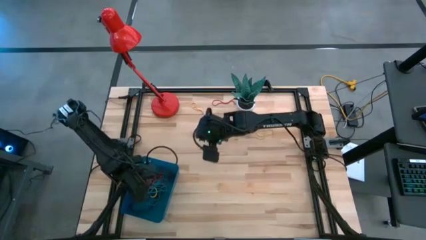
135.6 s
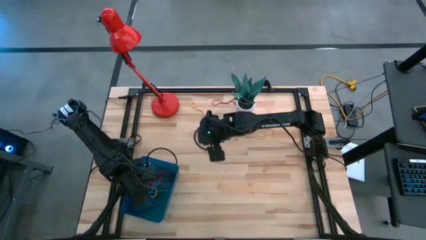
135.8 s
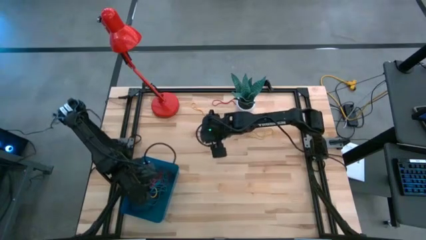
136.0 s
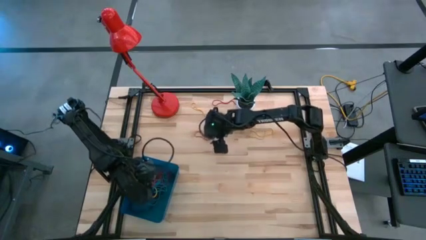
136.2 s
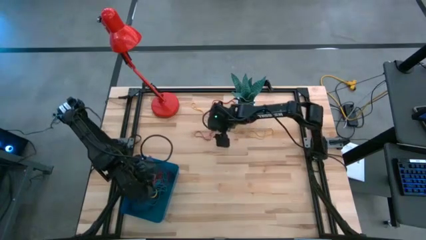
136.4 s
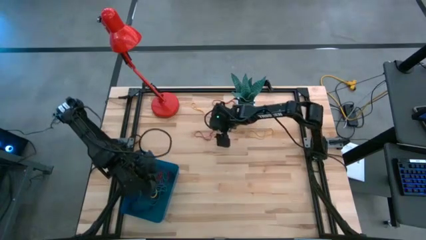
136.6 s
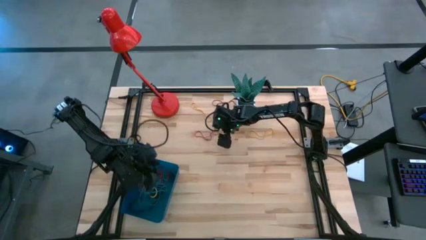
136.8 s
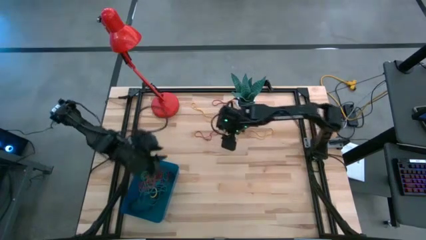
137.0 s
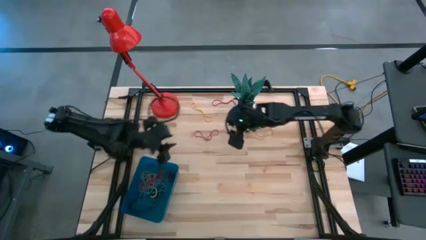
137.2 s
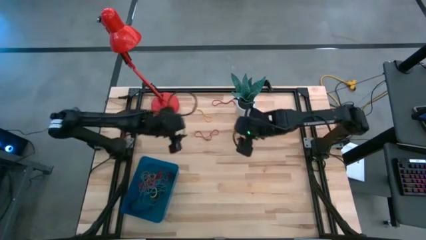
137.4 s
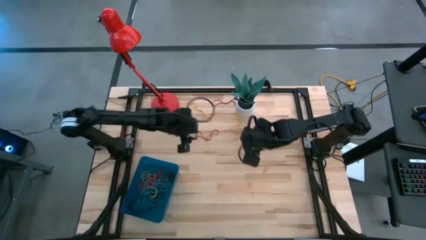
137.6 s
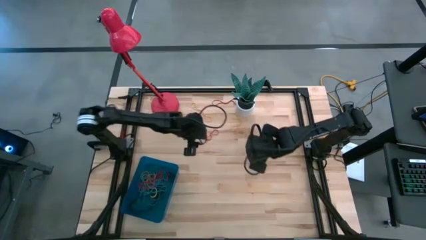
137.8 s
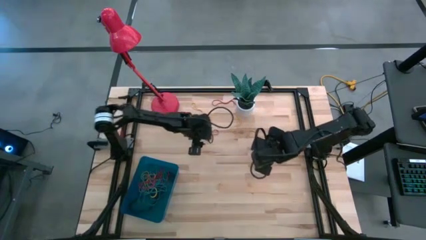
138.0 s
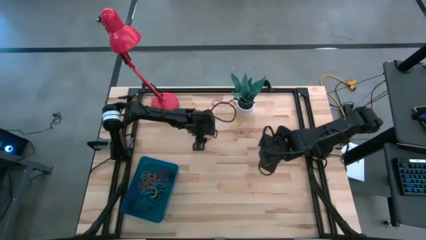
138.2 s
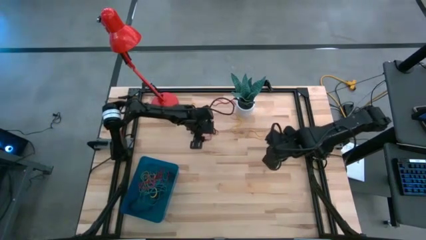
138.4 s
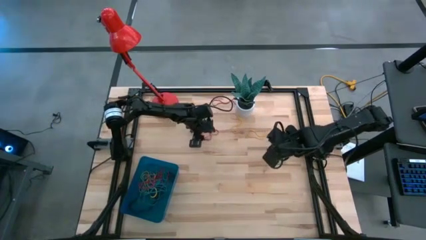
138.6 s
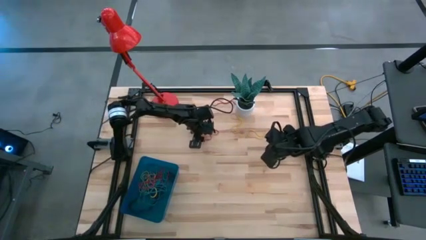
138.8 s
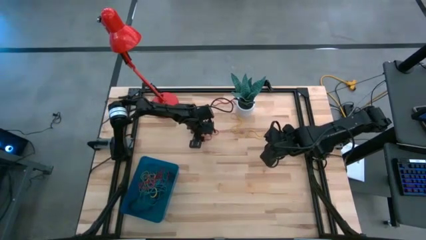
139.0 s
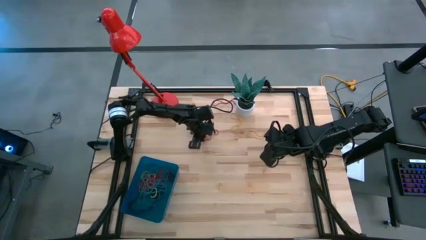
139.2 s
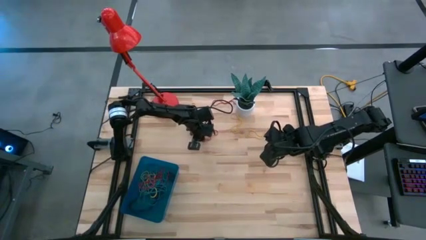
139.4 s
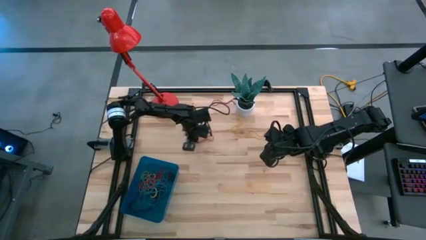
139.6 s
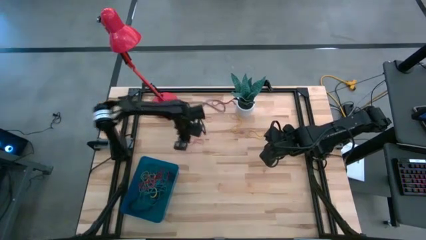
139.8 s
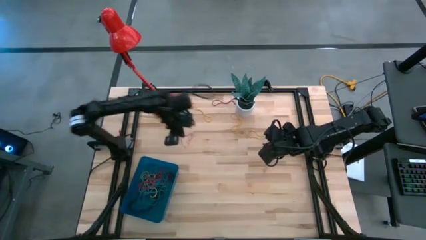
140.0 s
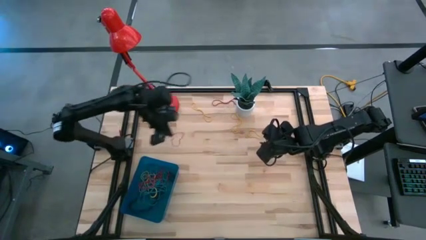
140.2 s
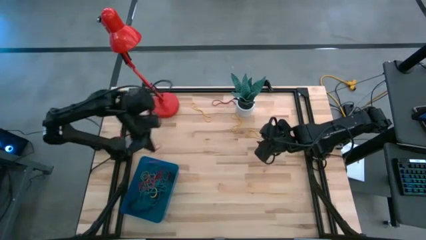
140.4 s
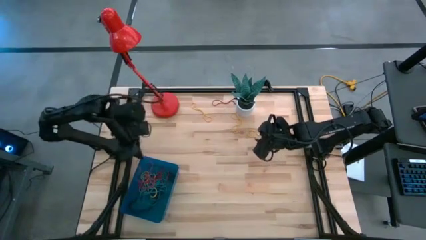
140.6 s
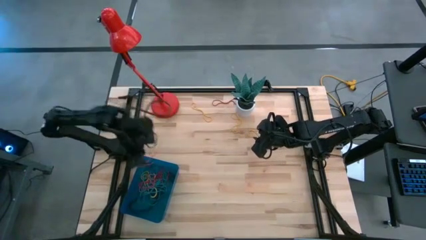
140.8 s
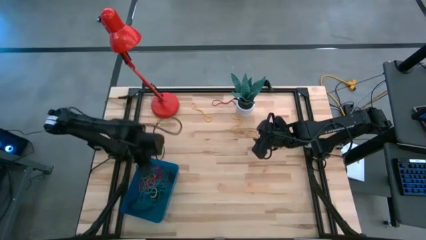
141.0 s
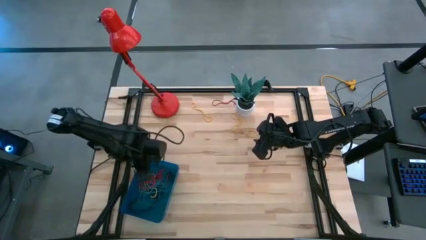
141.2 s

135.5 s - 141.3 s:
Task: Pick and place rubber bands into bin
Put the red rubber band into the blue bin

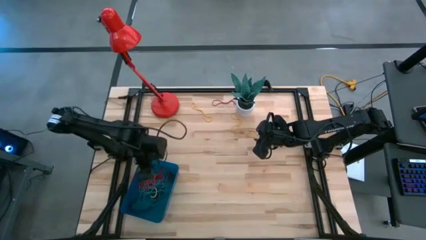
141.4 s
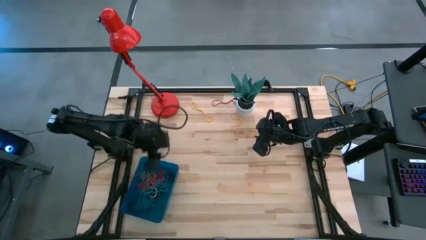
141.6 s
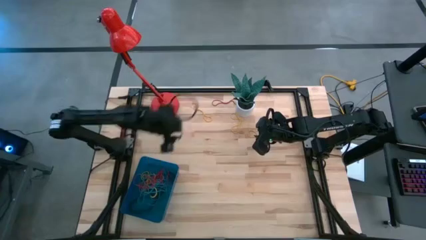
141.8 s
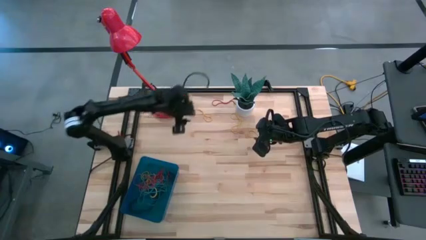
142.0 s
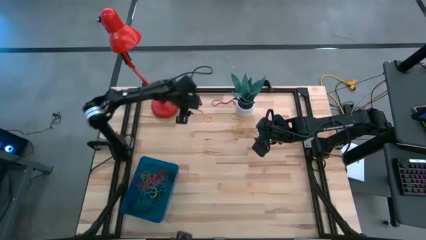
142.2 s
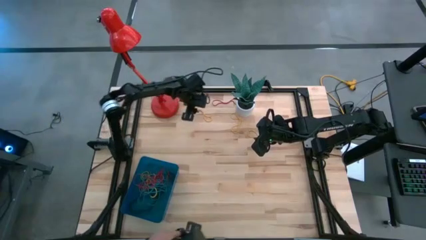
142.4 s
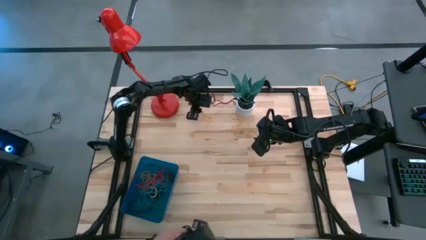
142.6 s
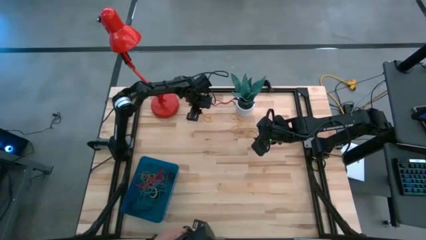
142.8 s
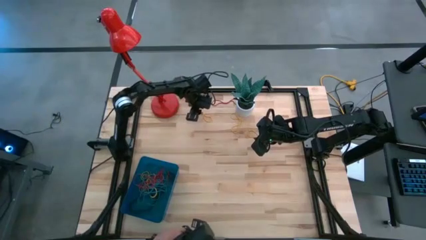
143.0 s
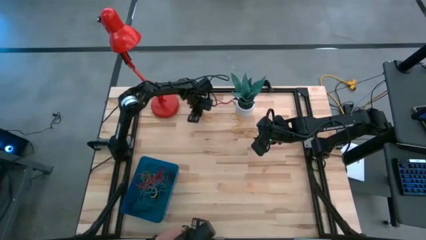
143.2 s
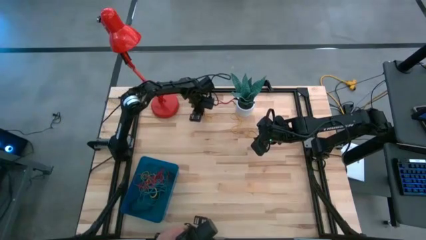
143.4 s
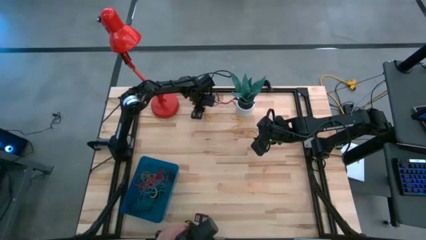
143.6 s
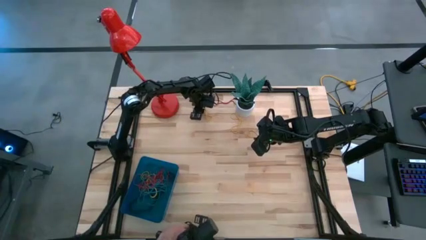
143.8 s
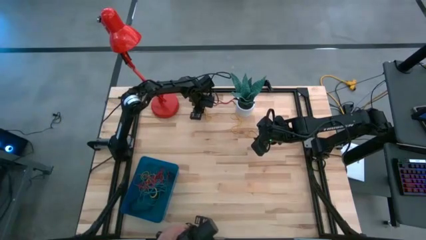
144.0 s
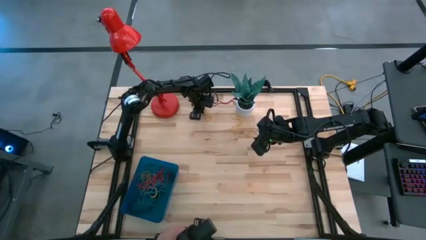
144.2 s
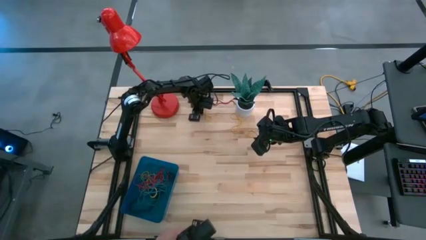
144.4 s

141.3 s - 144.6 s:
Put the yellow rubber band into the blue bin

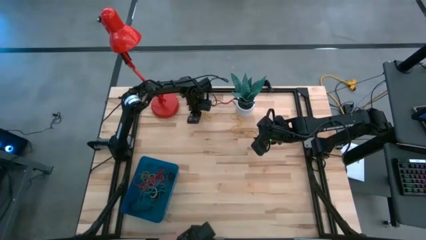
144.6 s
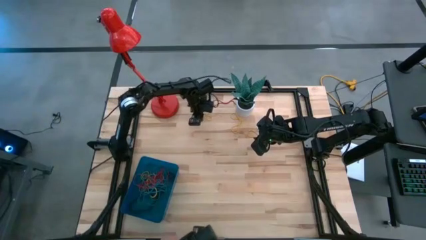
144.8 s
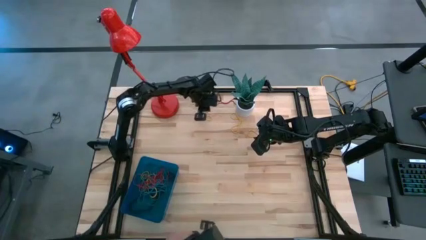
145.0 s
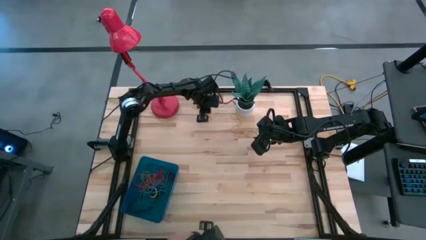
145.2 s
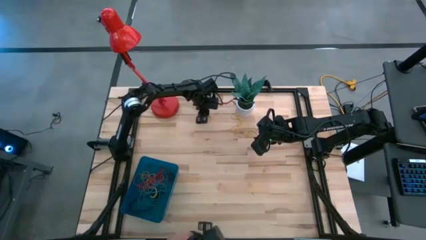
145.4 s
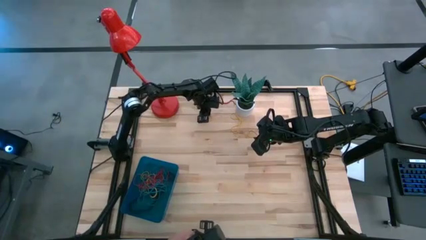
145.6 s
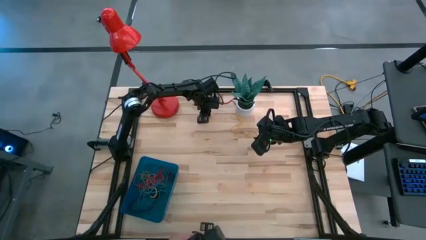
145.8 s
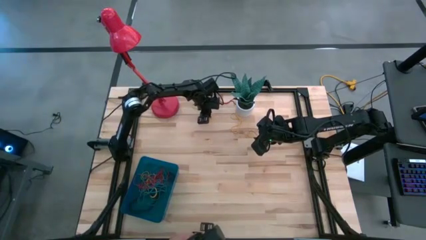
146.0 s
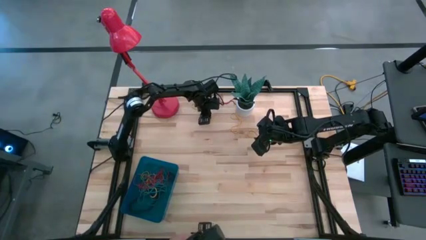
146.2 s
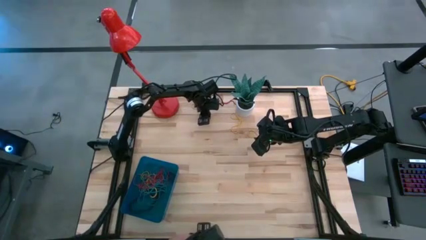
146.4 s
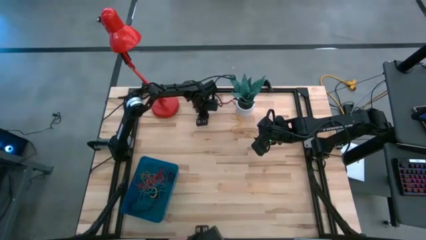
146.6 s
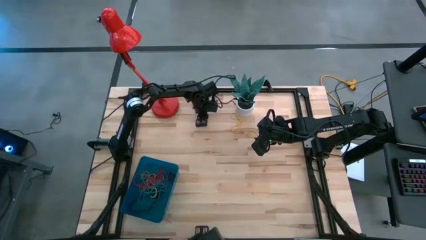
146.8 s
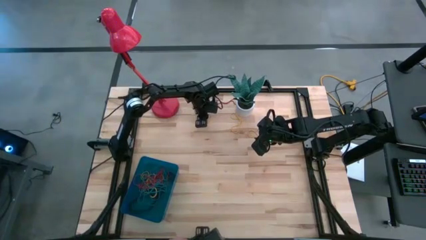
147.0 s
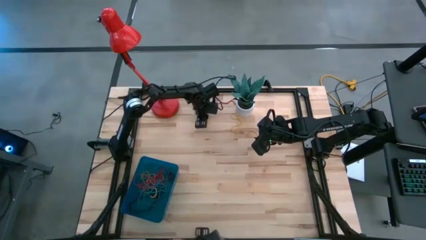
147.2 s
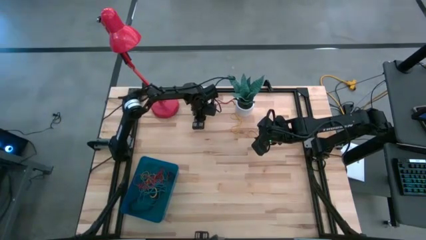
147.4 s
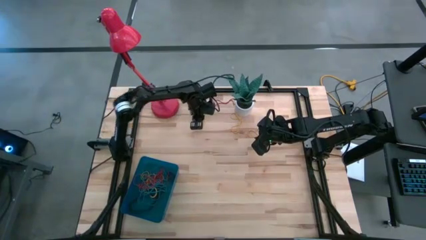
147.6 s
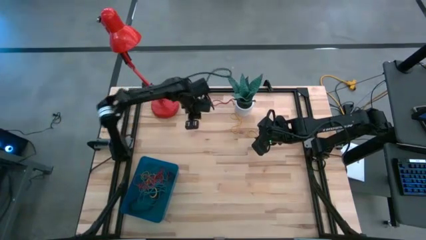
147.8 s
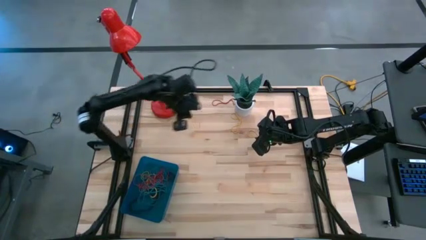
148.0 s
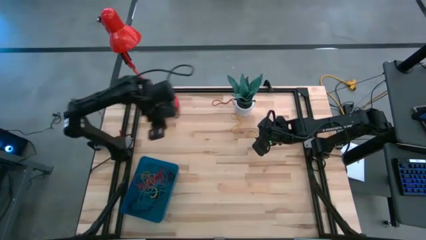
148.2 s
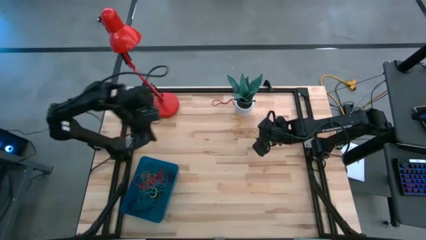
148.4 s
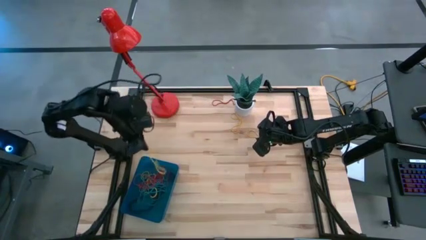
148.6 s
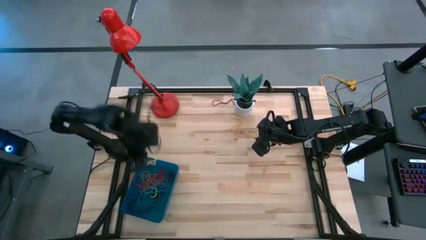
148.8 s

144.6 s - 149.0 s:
Put the yellow rubber band into the blue bin
